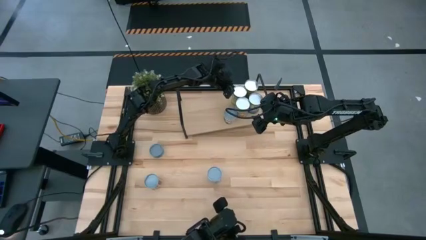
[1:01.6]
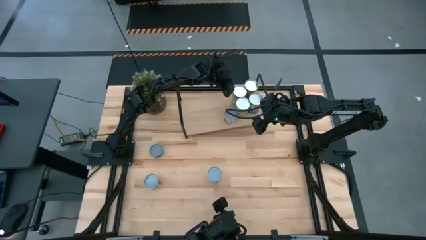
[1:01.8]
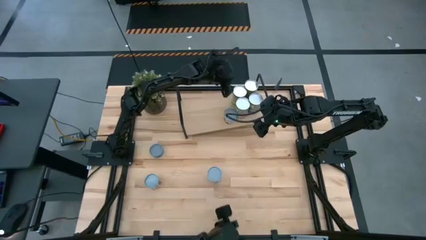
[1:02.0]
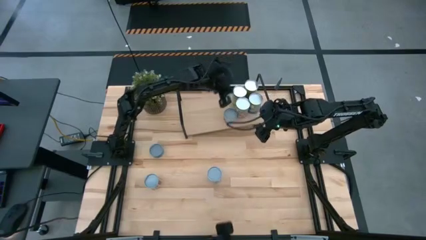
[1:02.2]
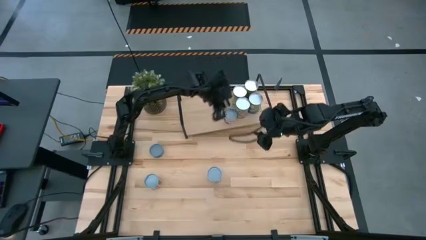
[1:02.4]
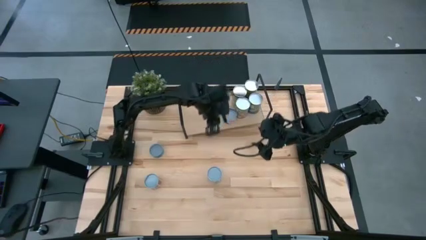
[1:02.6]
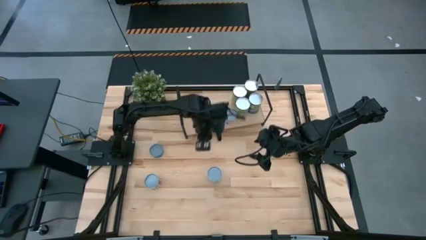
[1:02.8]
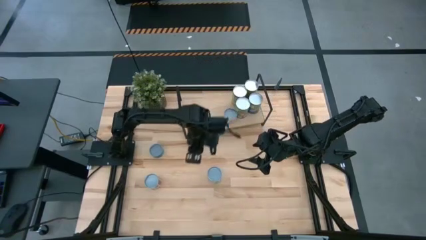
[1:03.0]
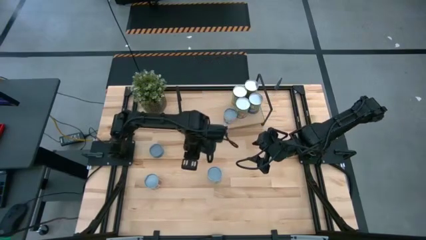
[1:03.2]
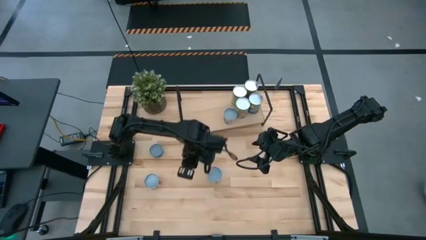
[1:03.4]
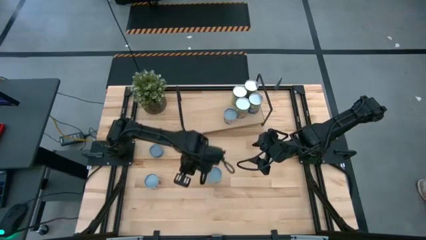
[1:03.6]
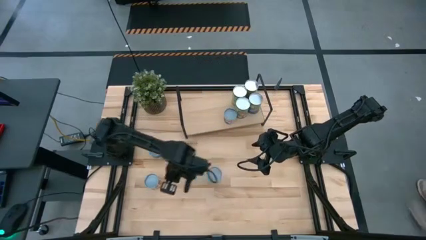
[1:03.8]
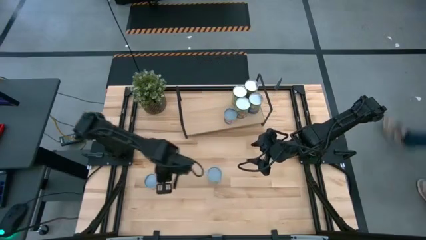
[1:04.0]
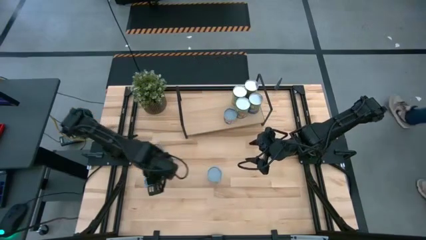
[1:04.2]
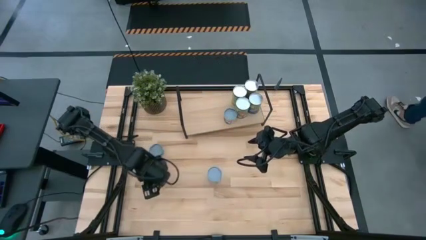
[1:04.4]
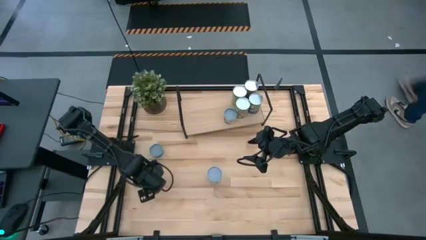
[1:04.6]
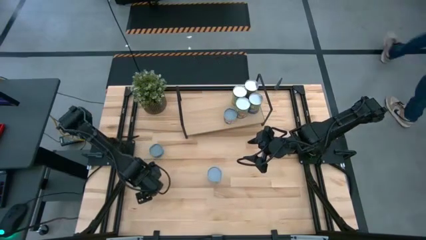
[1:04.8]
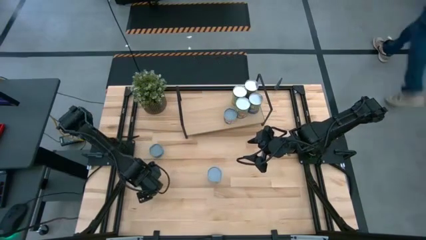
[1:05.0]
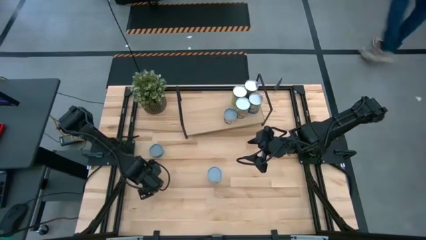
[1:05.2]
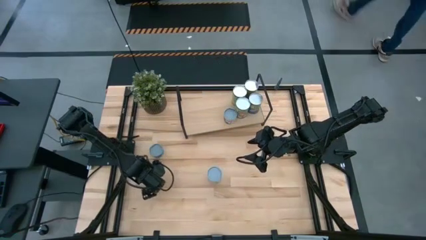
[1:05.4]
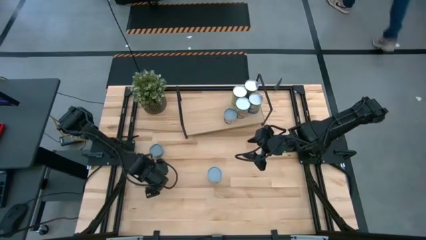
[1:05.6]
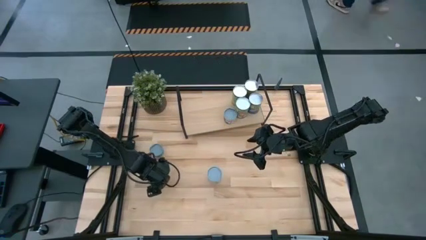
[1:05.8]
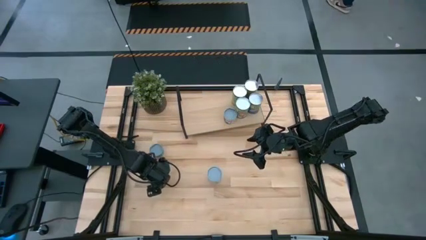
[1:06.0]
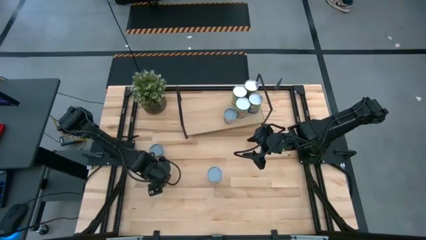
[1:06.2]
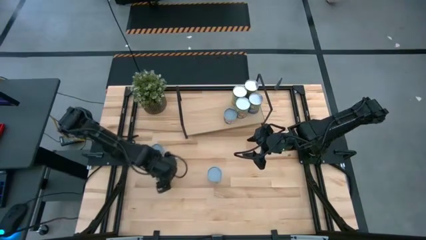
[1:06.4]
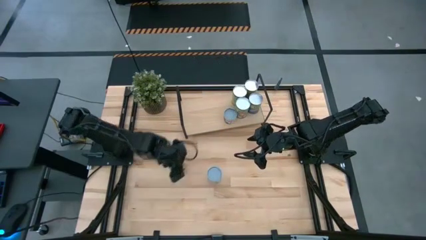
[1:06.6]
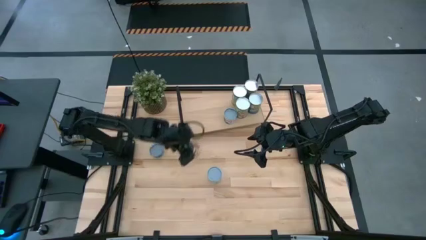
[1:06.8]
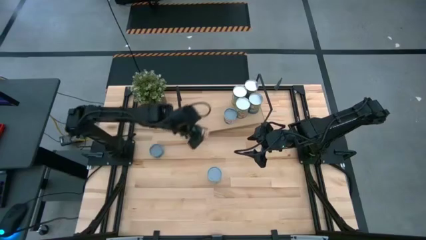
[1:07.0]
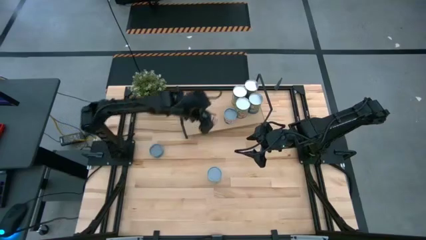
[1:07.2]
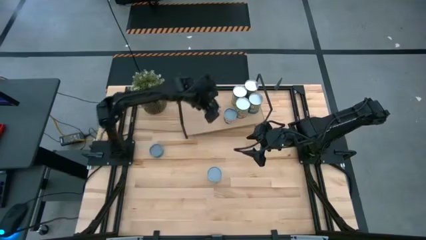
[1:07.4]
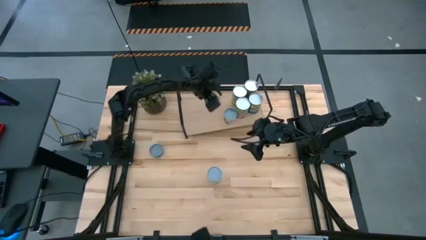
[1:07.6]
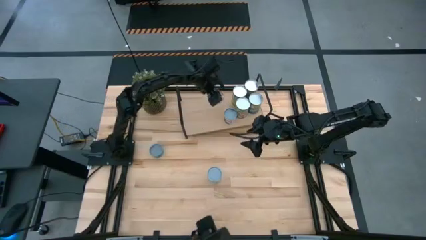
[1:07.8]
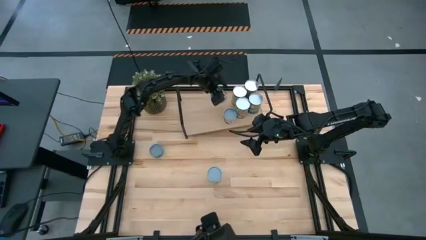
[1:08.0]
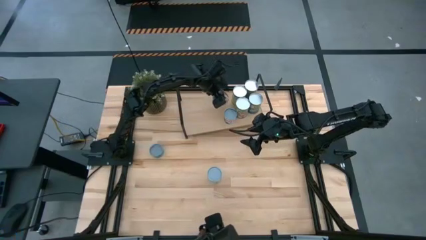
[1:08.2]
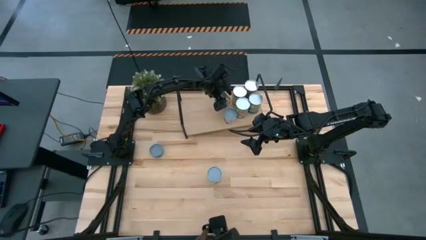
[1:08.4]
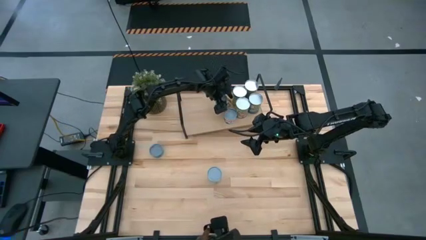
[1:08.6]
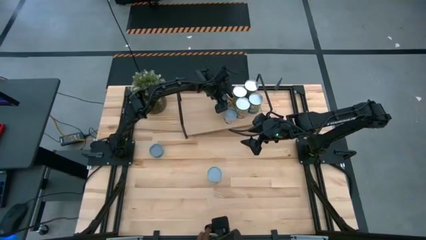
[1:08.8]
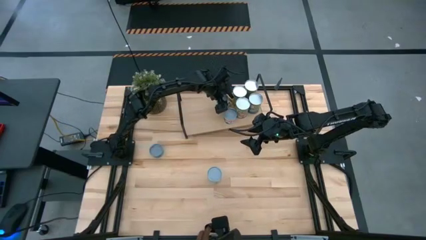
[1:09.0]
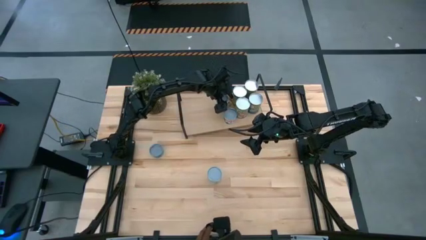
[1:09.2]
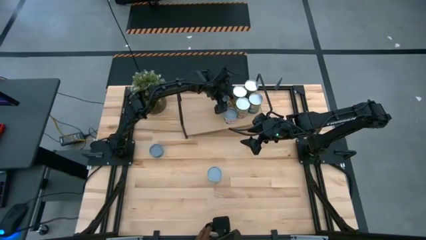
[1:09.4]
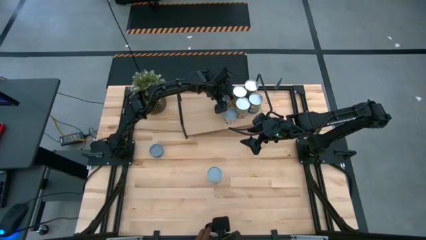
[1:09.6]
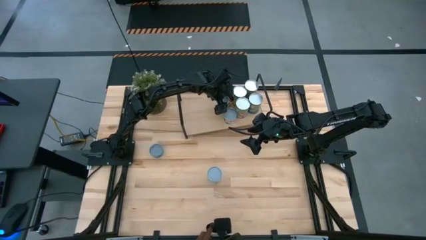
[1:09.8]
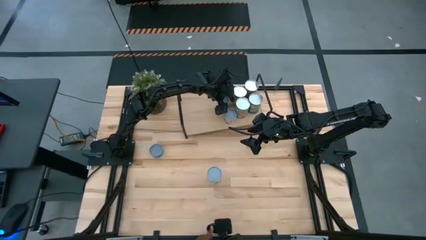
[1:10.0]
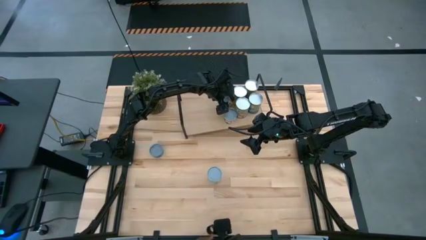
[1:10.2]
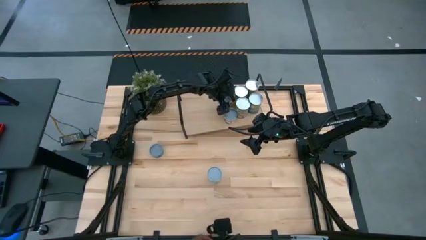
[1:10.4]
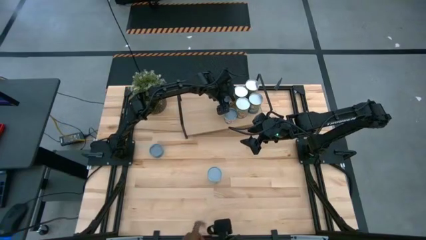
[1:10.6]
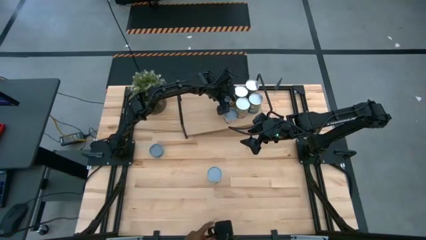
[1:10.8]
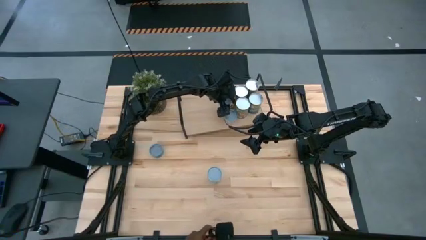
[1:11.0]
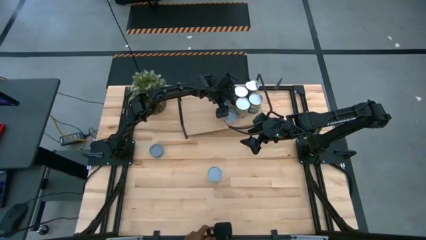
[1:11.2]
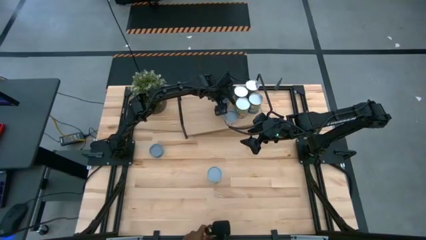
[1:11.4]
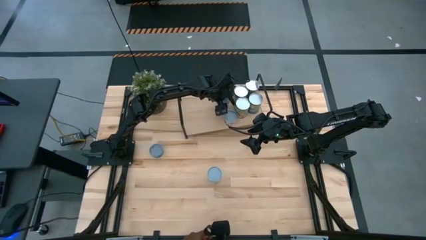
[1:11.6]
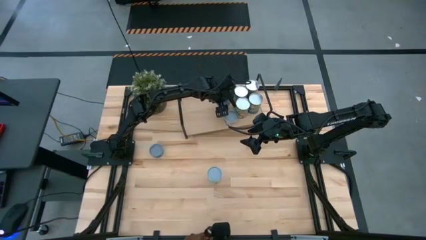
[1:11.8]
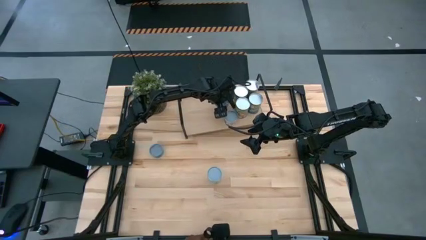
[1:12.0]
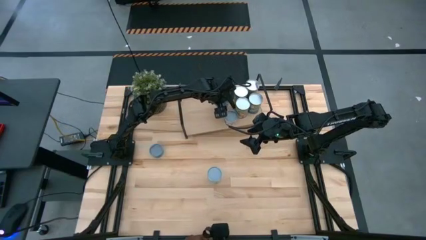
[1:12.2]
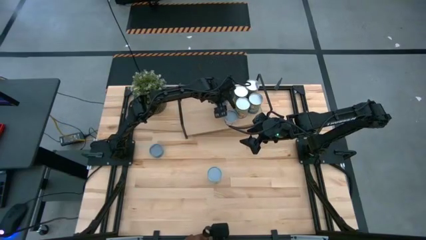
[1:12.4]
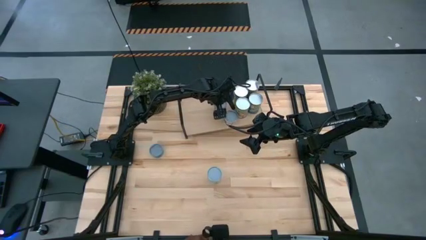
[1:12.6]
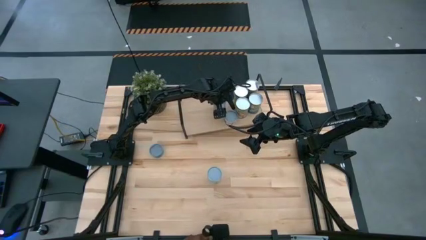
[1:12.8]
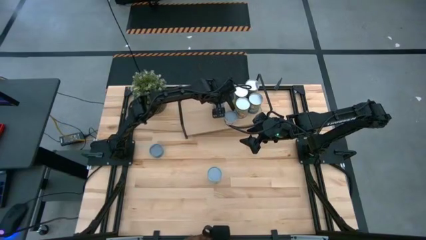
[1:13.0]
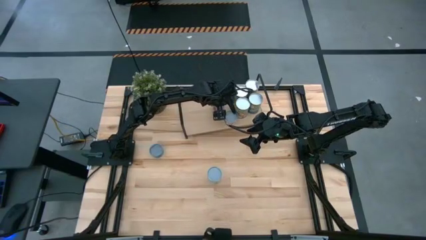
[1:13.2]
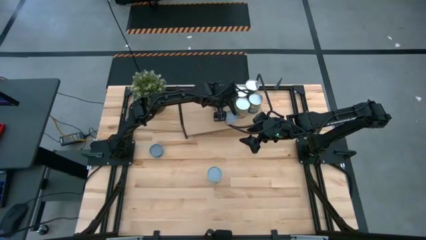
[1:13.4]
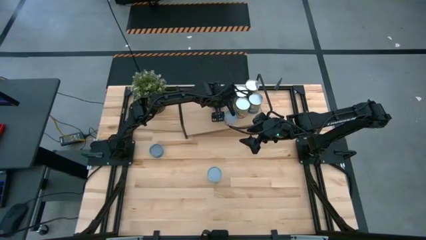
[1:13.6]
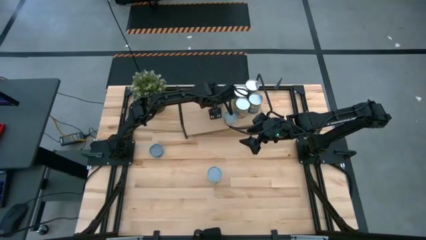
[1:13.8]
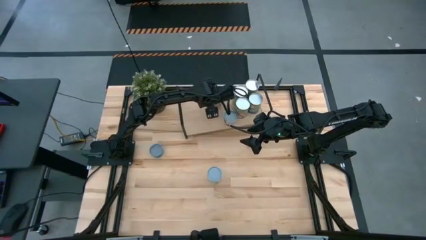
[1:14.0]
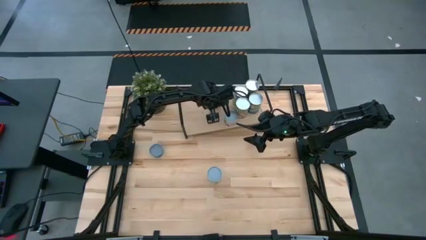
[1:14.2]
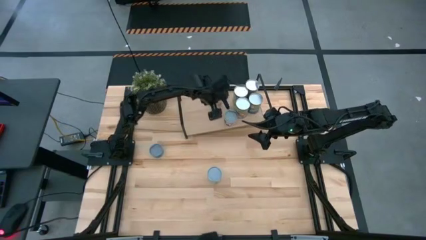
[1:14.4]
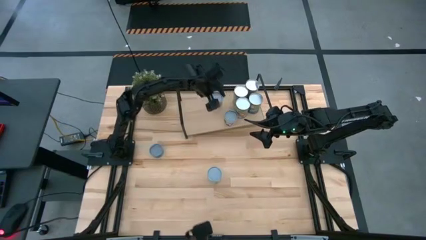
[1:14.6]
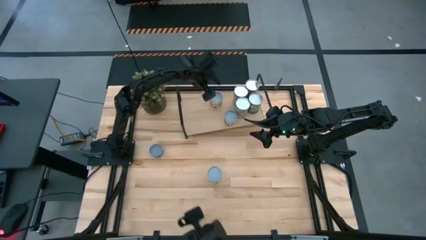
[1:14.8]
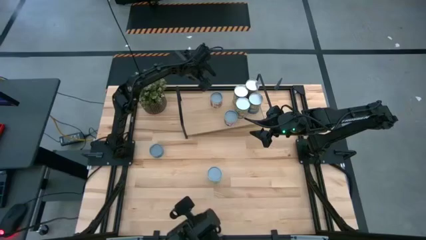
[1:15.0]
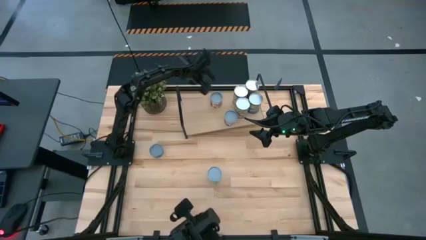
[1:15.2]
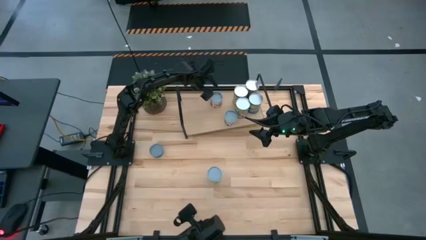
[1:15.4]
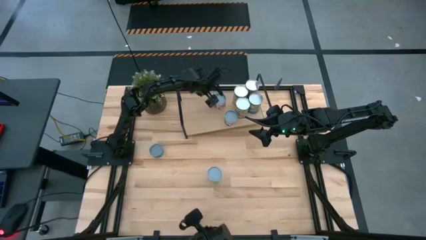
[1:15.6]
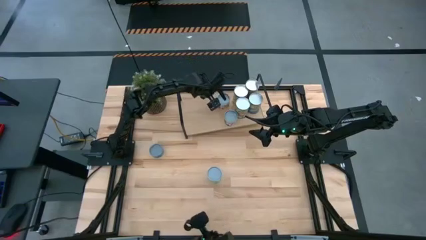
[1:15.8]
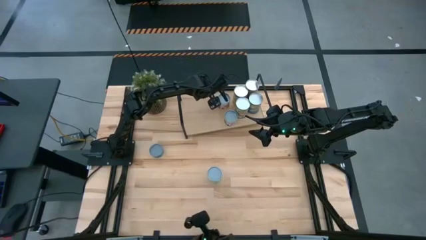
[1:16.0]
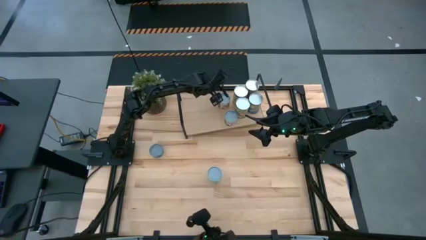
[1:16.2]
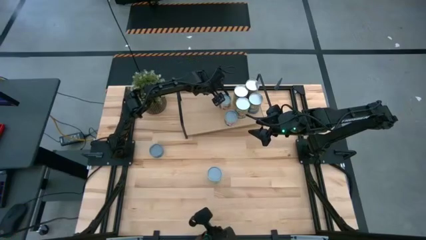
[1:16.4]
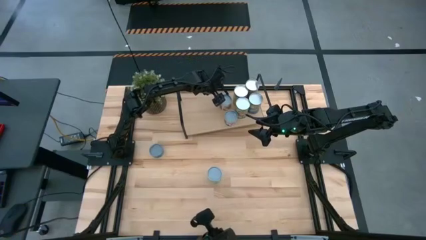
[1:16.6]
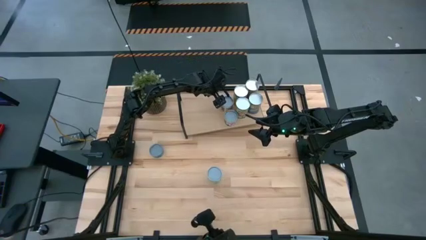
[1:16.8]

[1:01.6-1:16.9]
Task: Pick and place cans onto a shelf
Put the canned tomatoes on the shelf

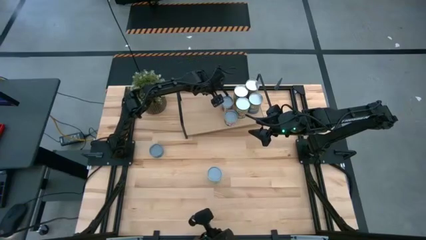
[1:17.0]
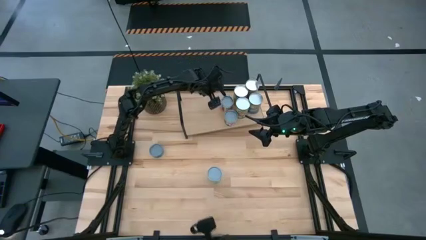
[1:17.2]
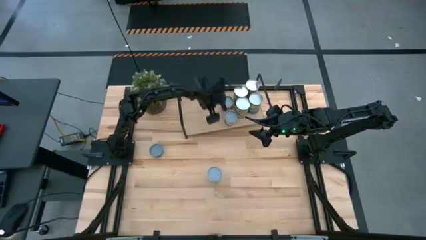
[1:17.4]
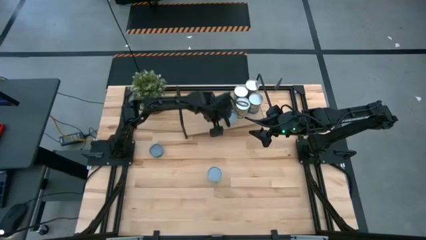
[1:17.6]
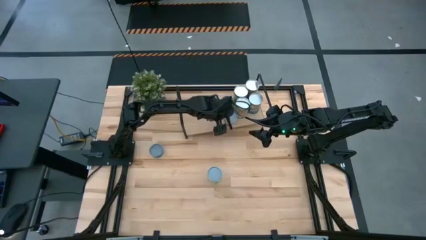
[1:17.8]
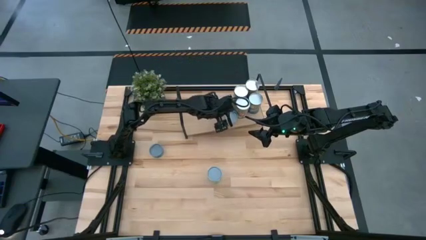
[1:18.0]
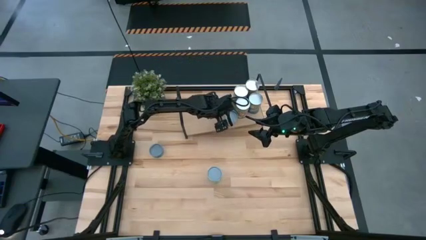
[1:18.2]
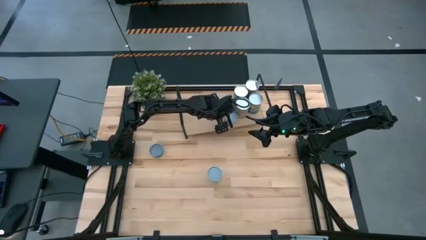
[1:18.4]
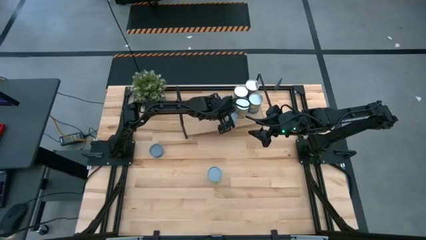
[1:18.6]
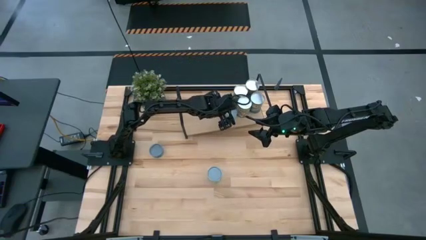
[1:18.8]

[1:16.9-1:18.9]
Adjust the cans on the shelf
